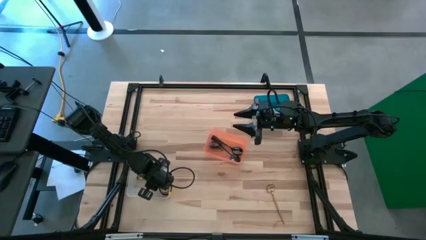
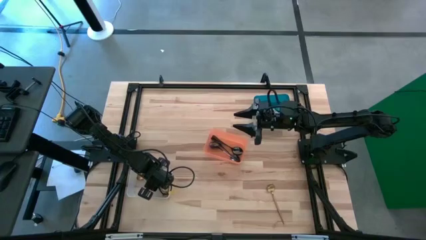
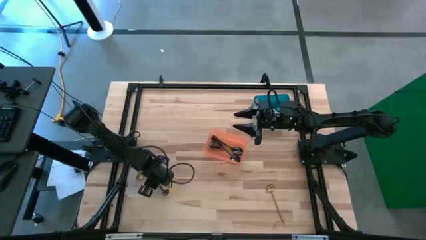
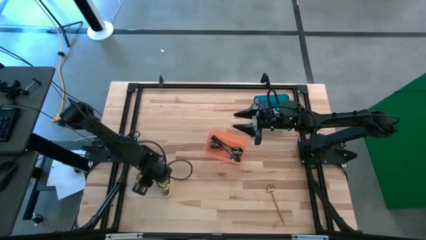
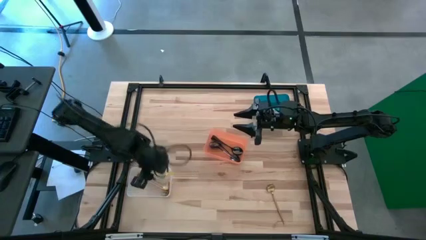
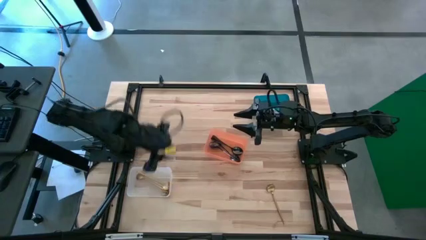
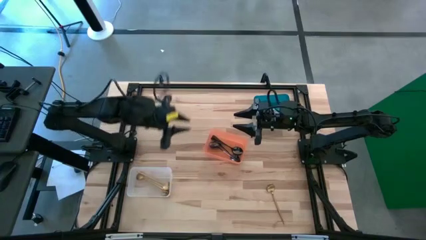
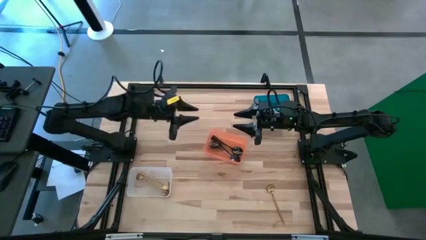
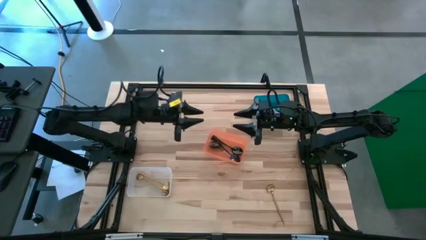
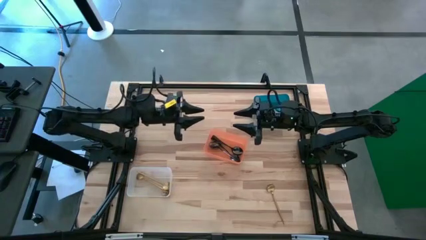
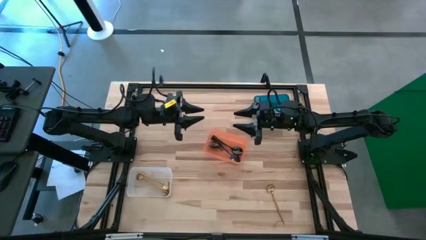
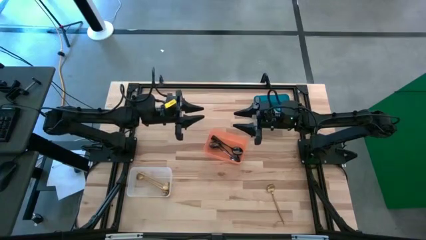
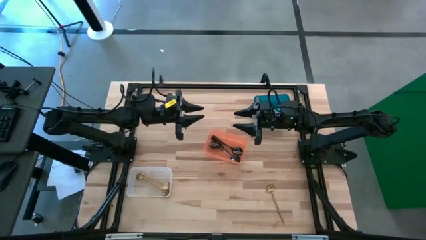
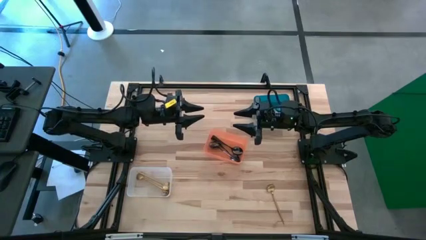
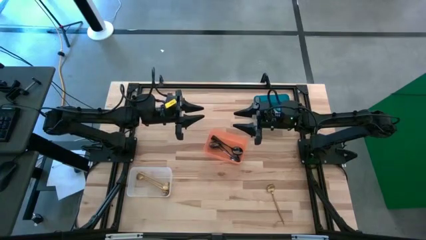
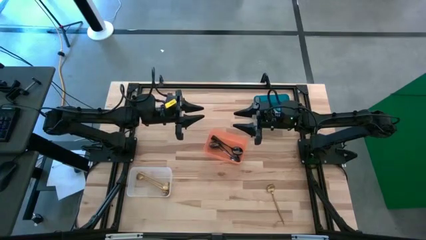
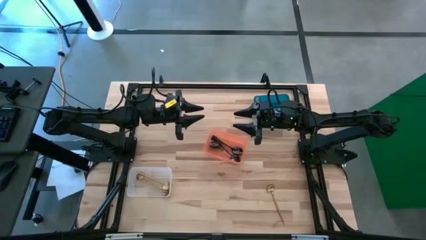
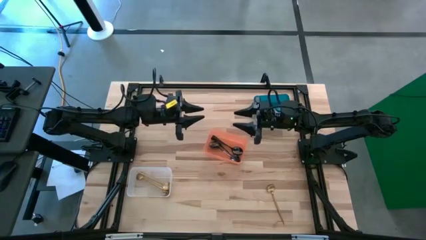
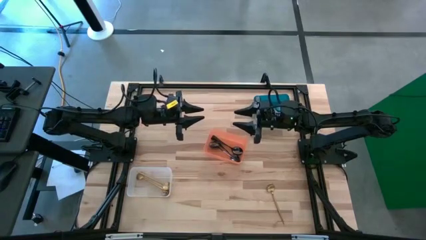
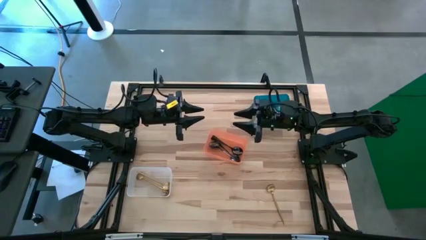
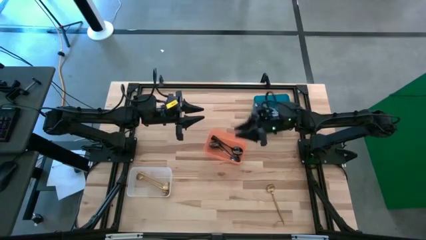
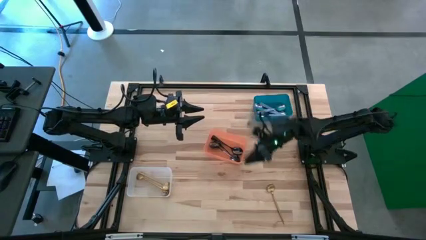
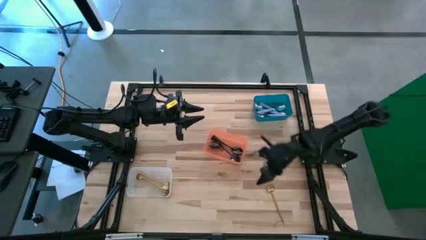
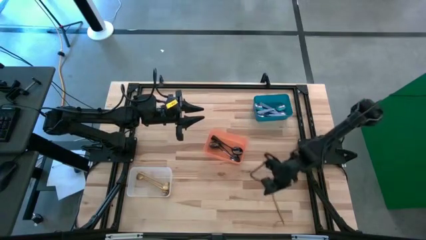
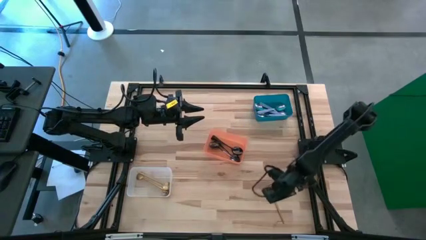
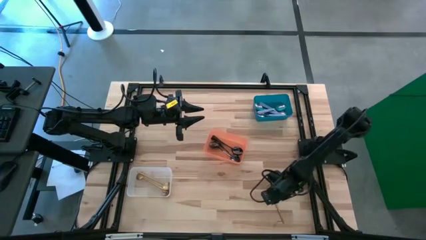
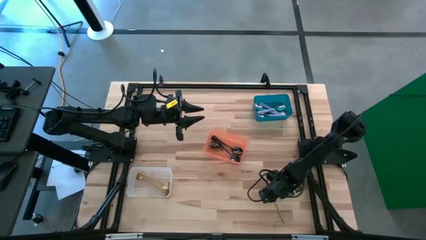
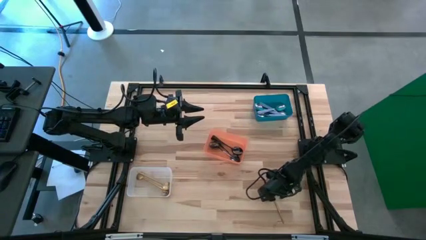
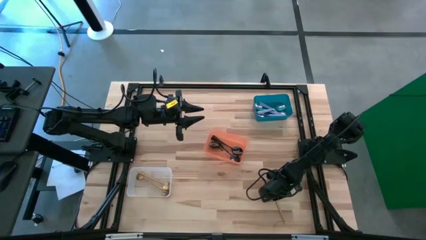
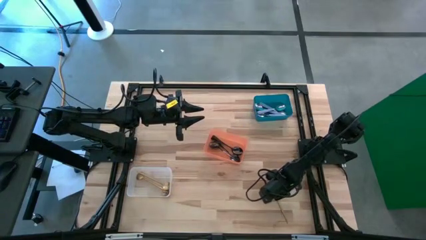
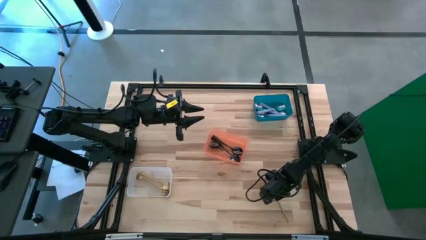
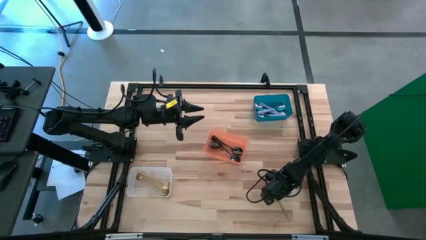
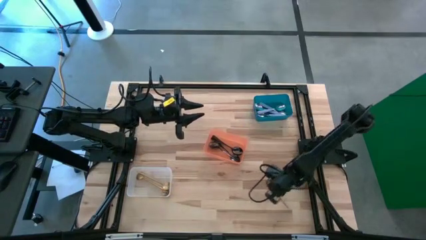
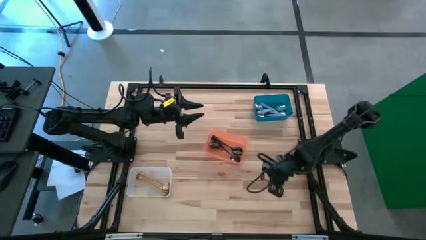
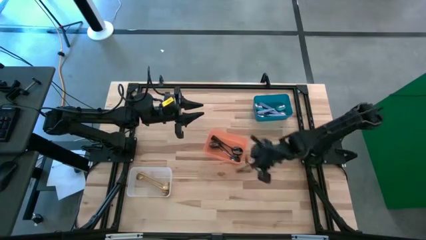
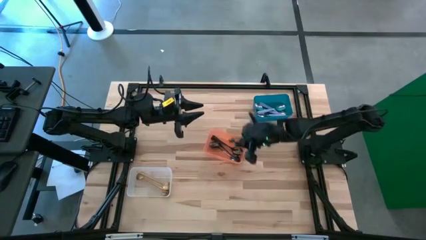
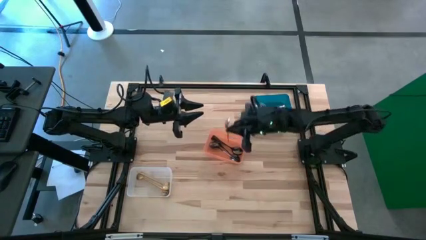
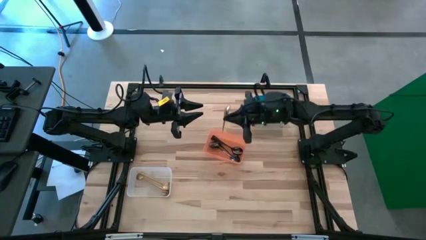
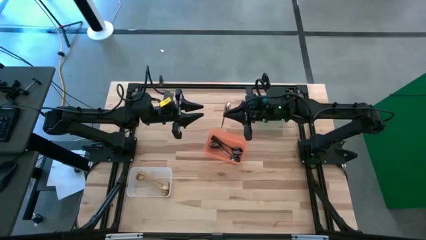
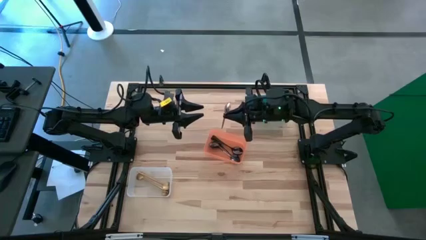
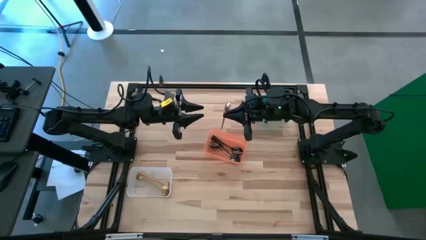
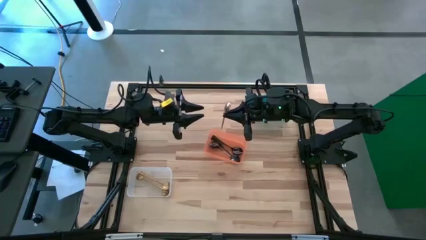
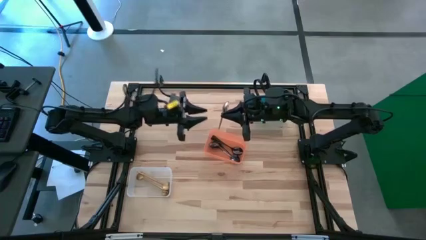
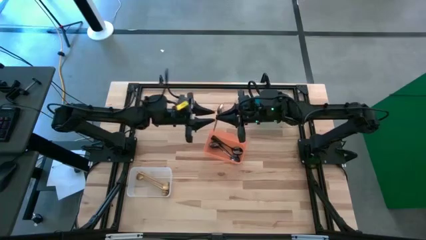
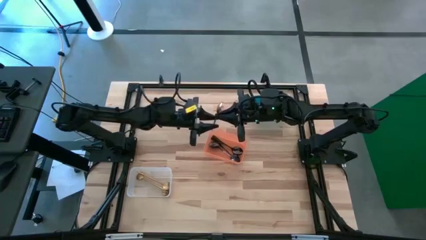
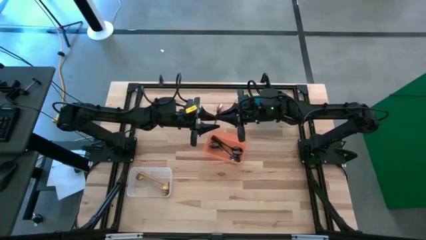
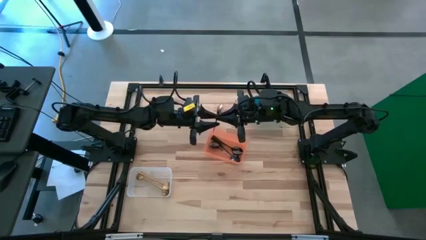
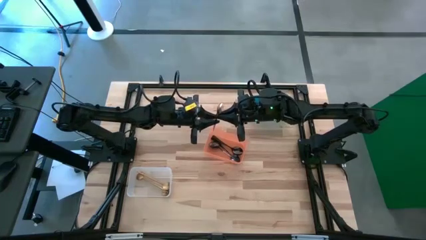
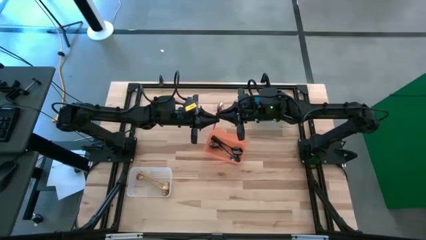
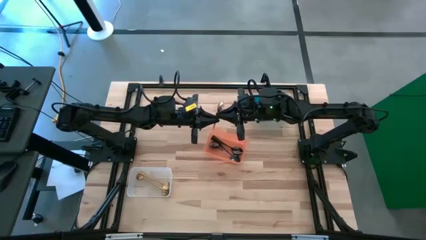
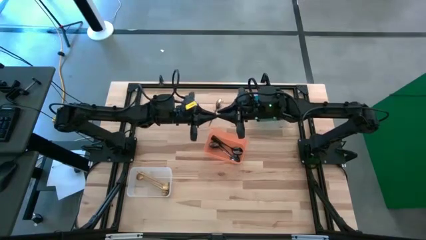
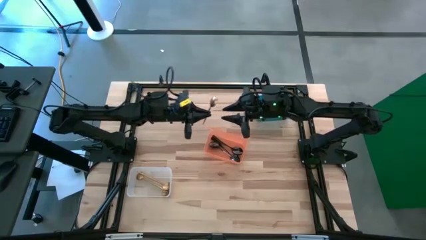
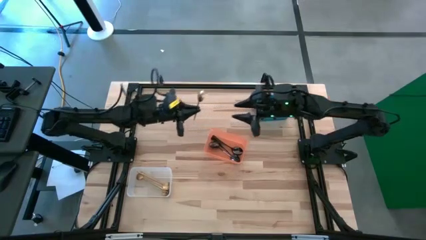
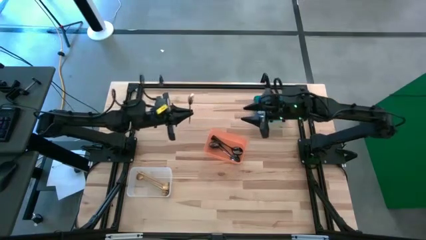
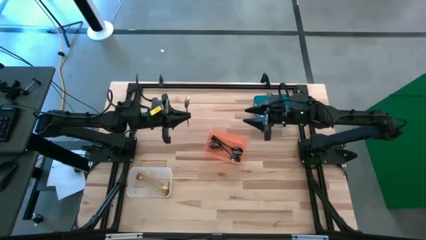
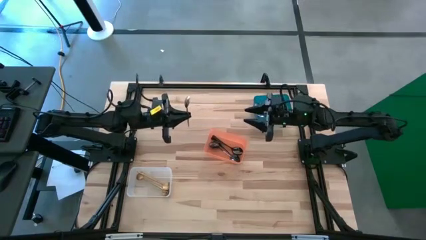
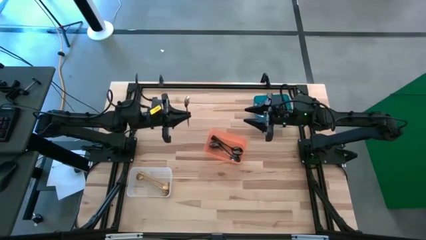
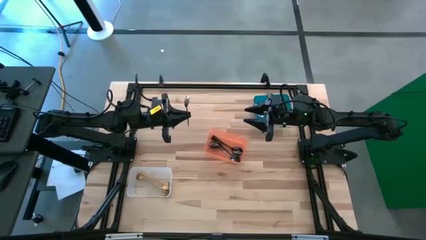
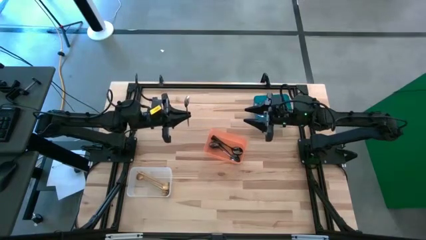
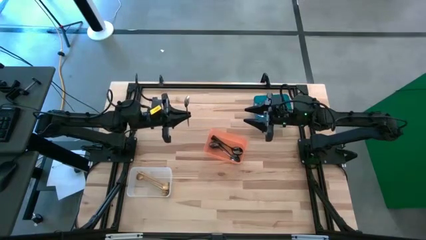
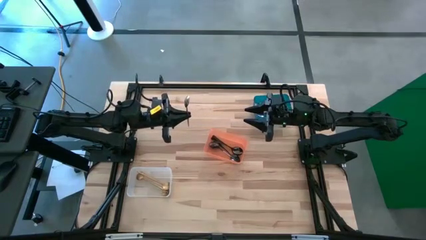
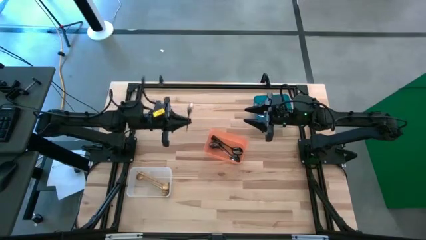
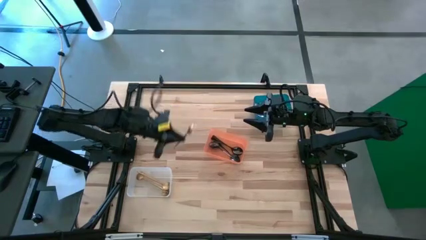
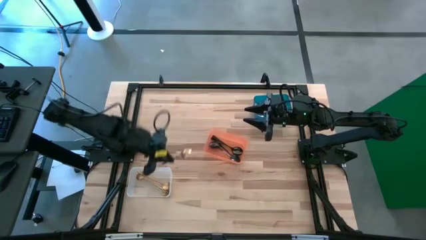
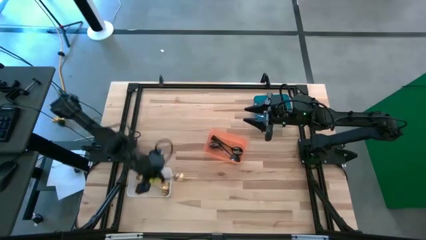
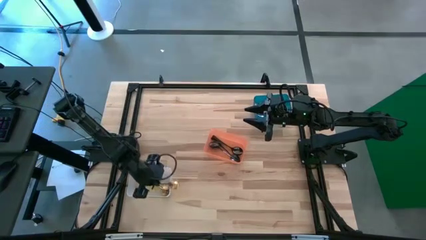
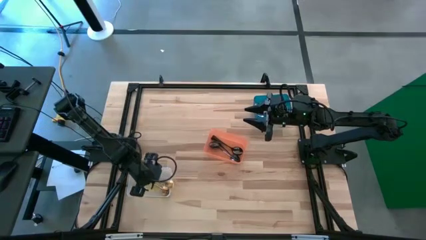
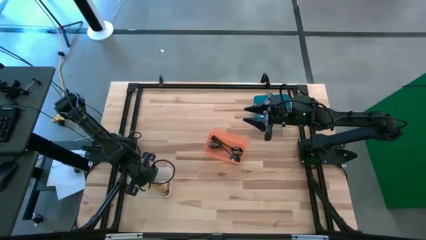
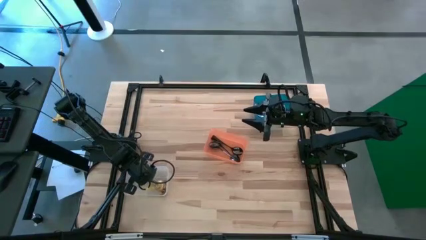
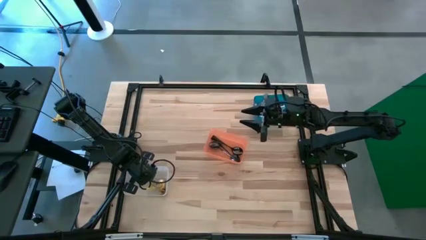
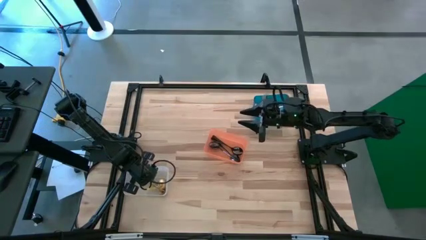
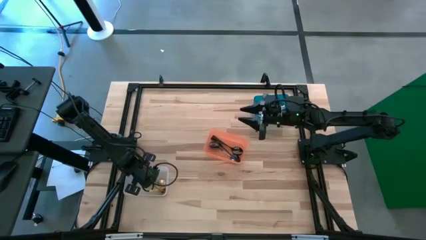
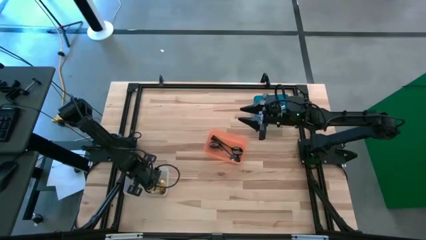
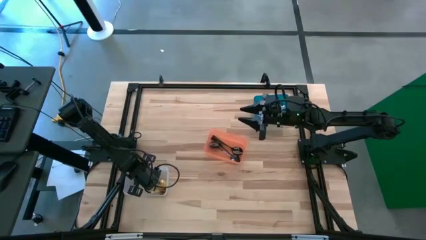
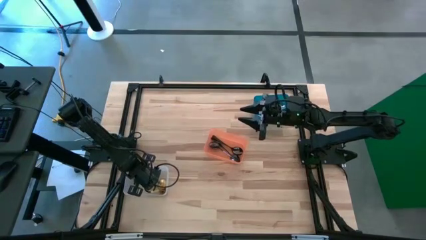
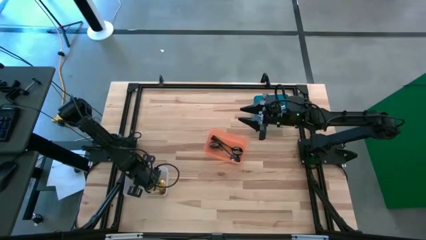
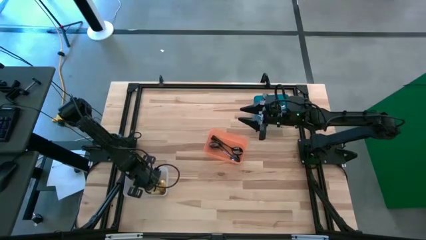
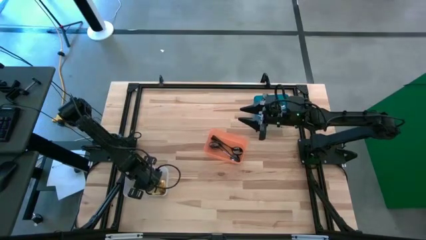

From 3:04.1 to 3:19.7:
Task: Sort silverware by color (type)
Put the golden spoon into the white bin

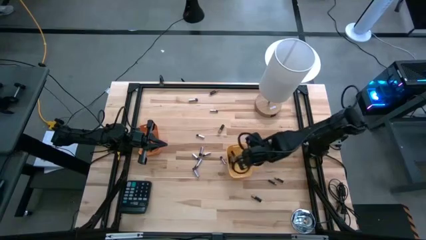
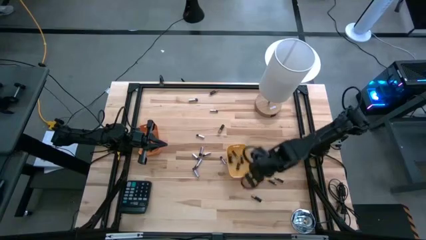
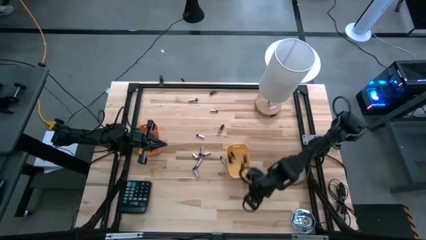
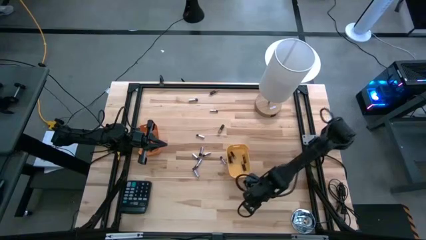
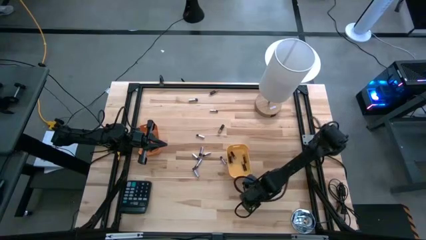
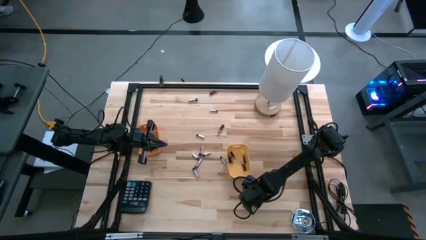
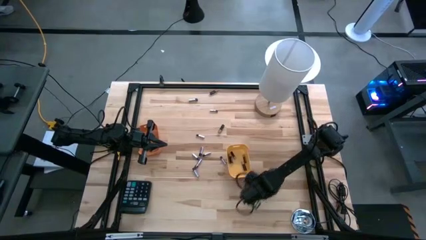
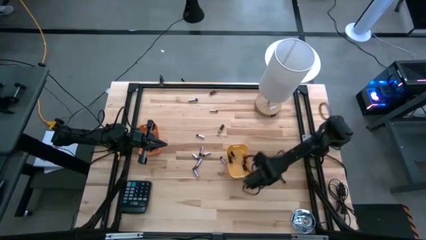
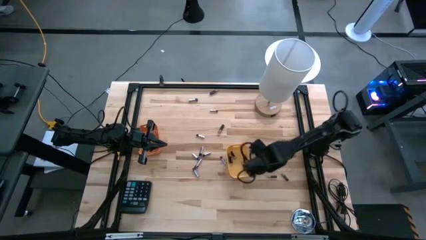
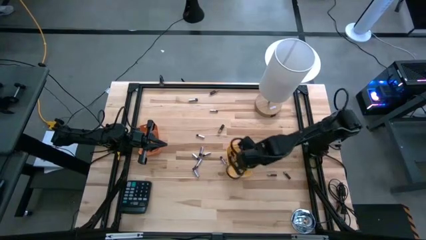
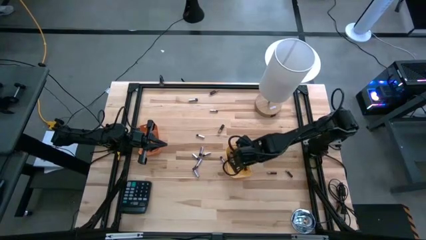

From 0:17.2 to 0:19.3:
Task: Sort batteries
Put the black battery into the yellow bin

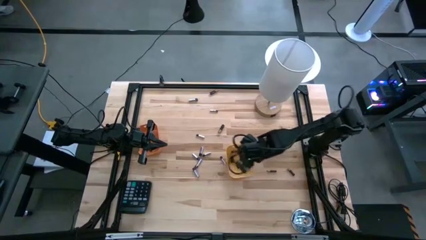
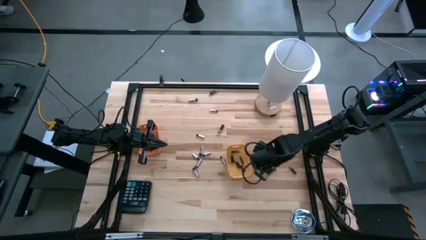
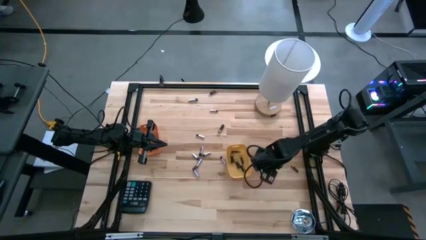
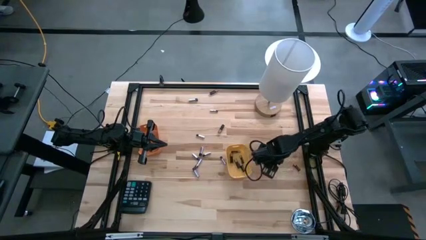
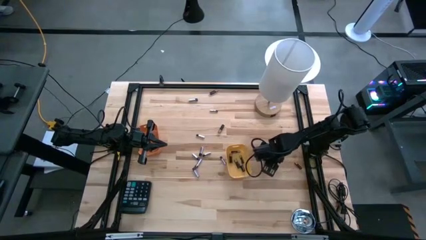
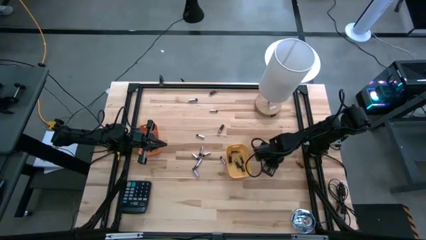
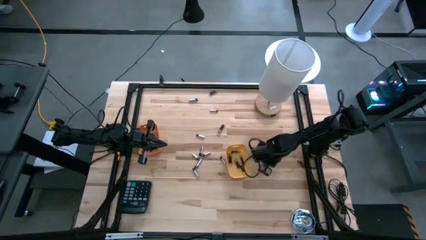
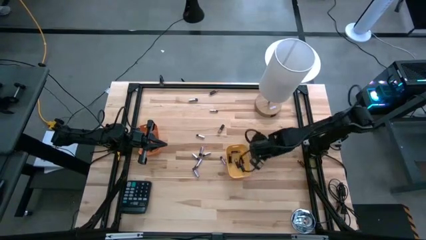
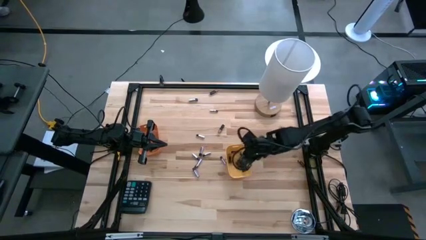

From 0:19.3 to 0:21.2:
Put the black battery into the yellow bin
